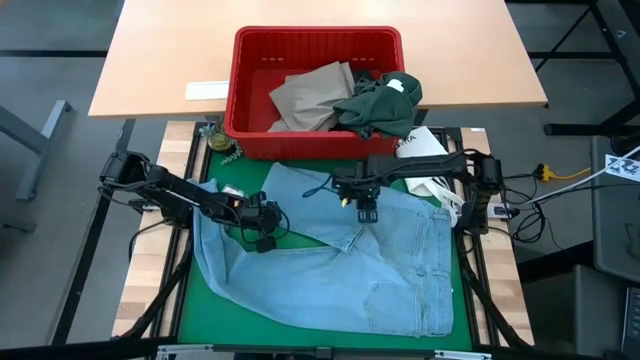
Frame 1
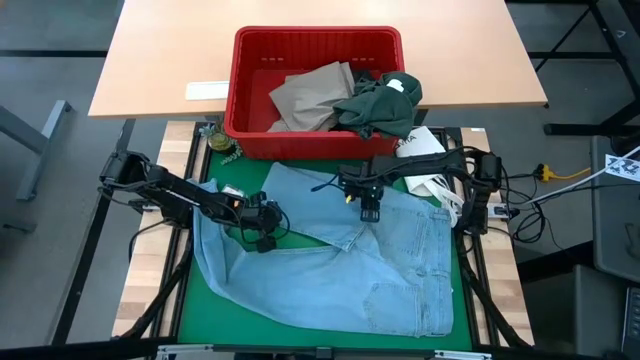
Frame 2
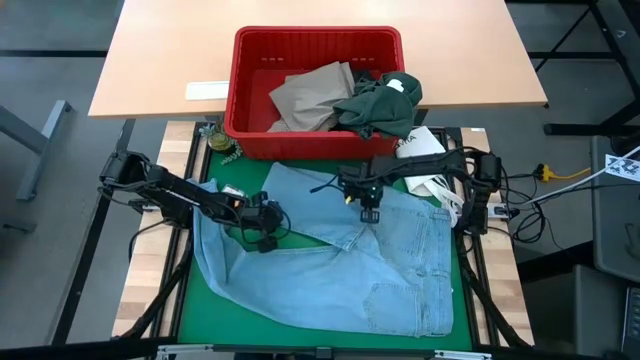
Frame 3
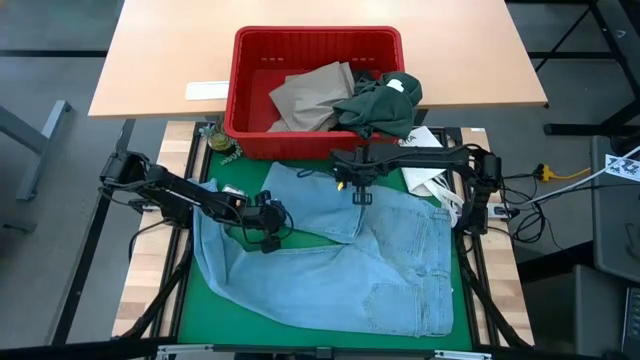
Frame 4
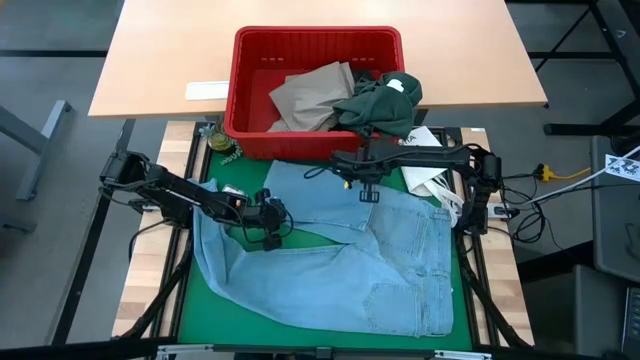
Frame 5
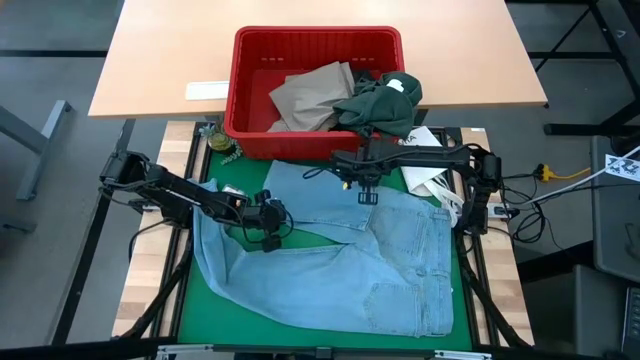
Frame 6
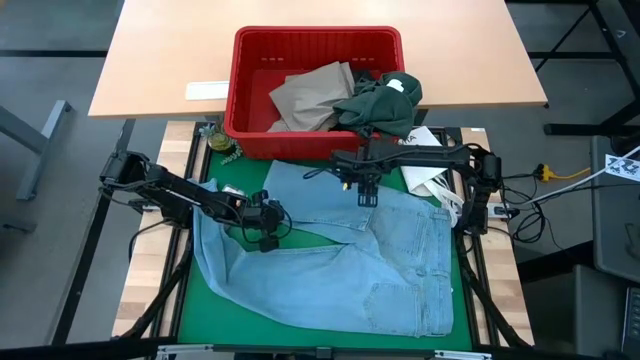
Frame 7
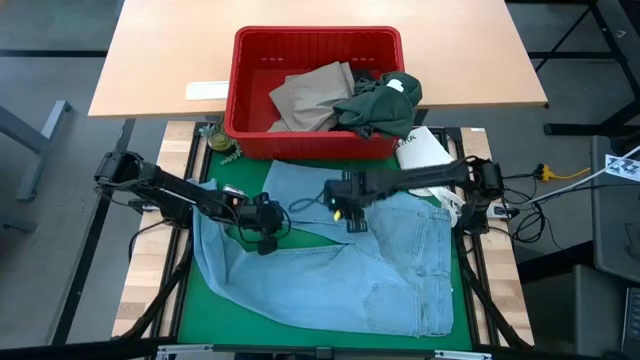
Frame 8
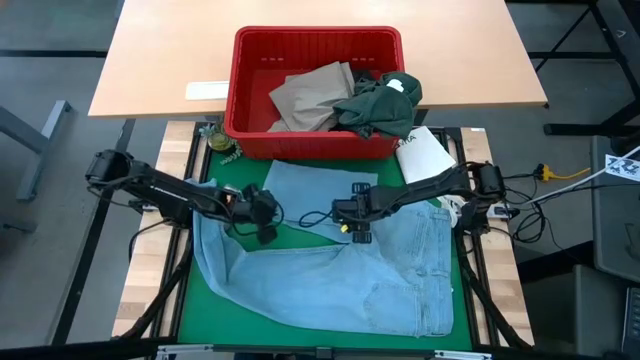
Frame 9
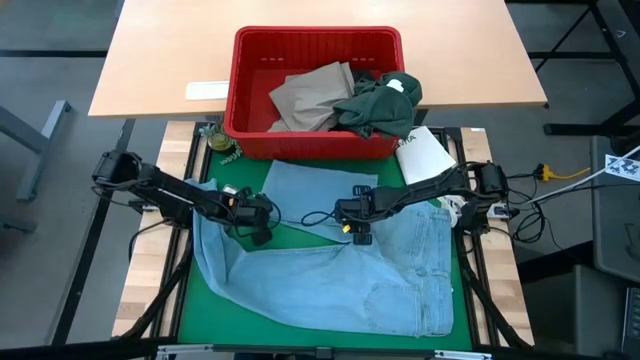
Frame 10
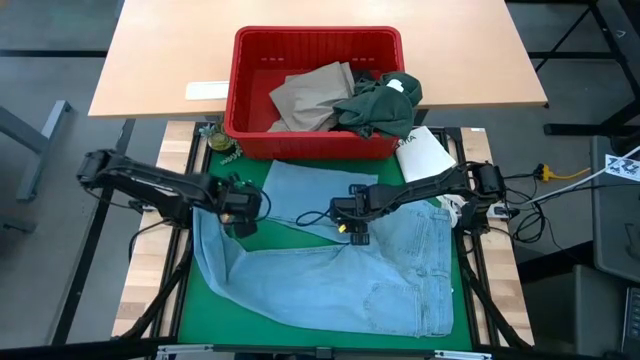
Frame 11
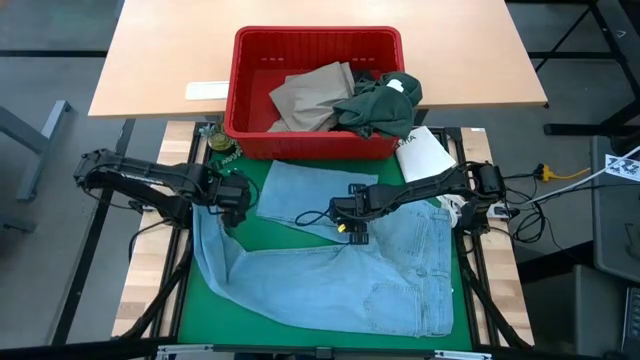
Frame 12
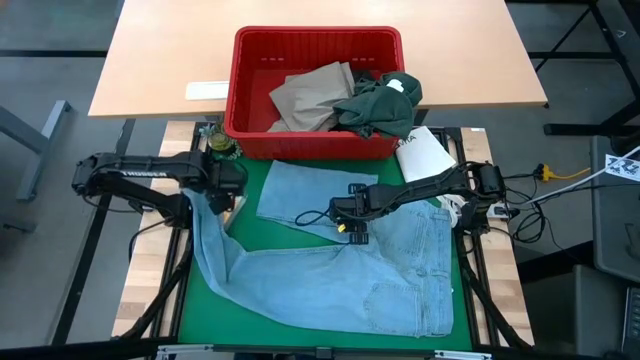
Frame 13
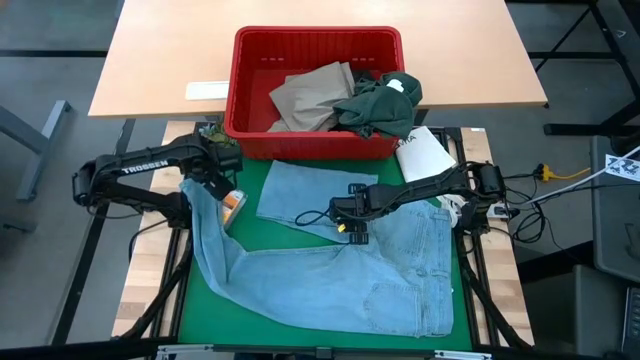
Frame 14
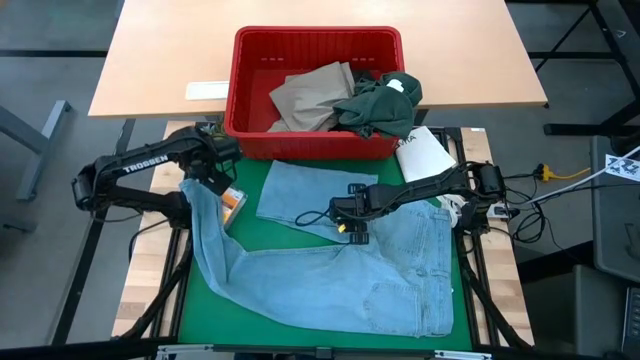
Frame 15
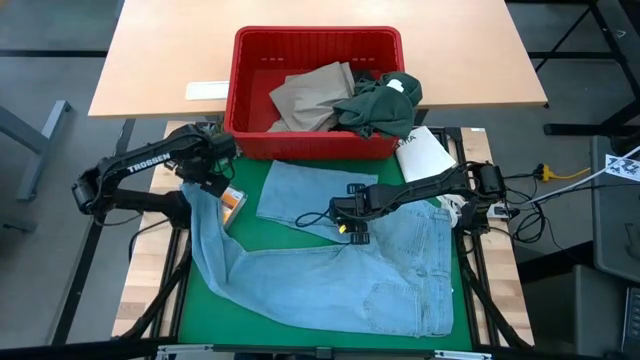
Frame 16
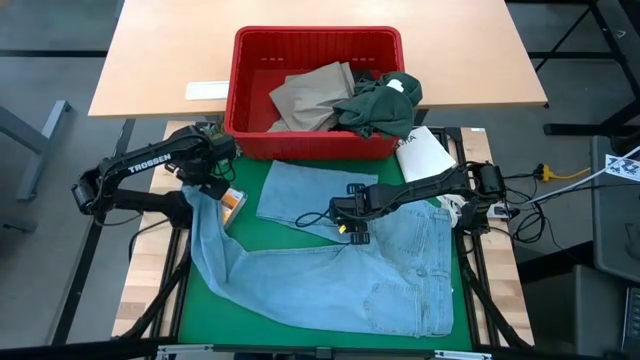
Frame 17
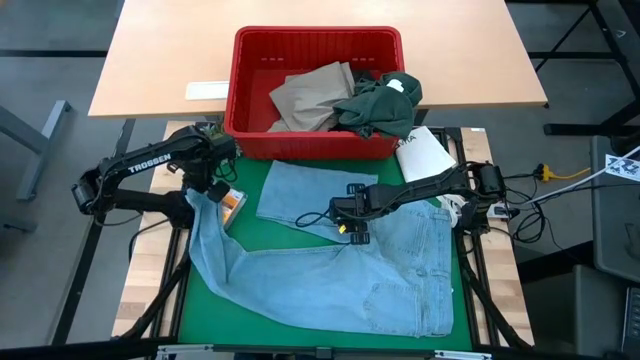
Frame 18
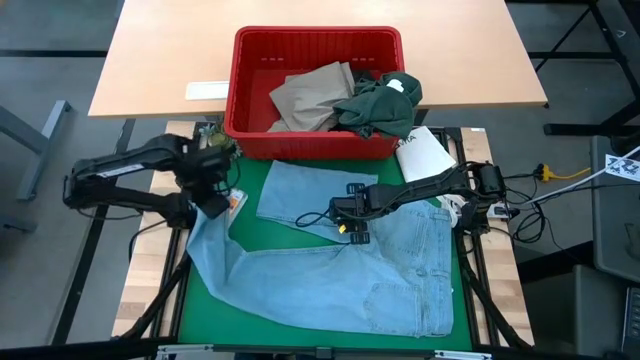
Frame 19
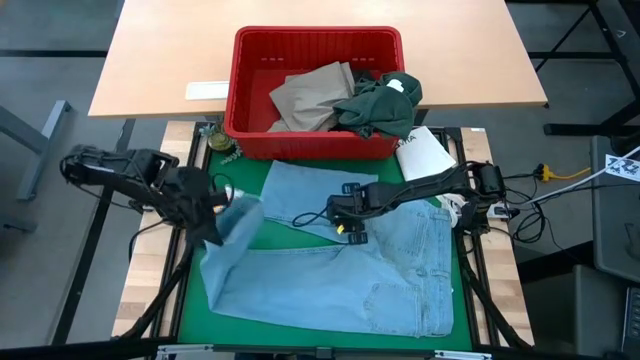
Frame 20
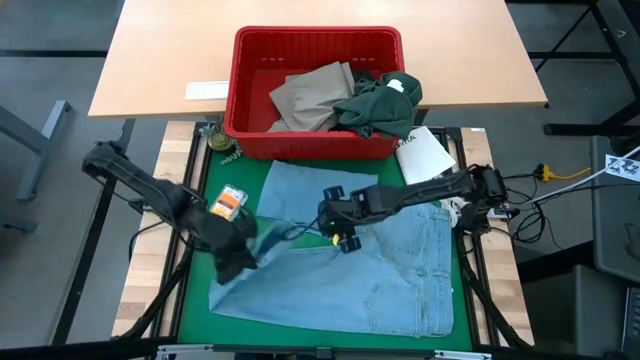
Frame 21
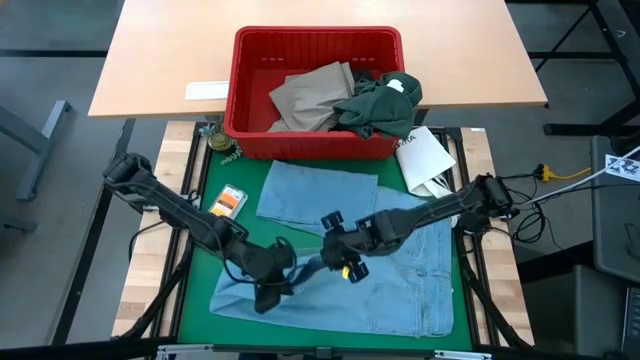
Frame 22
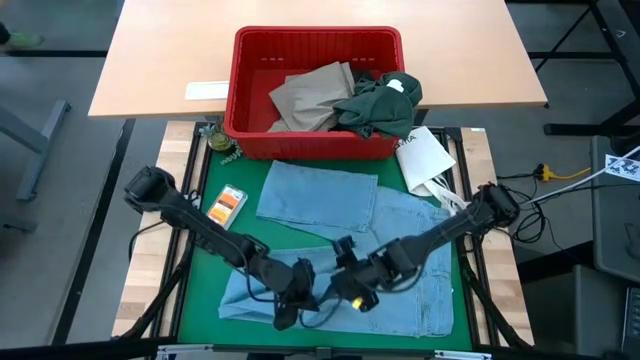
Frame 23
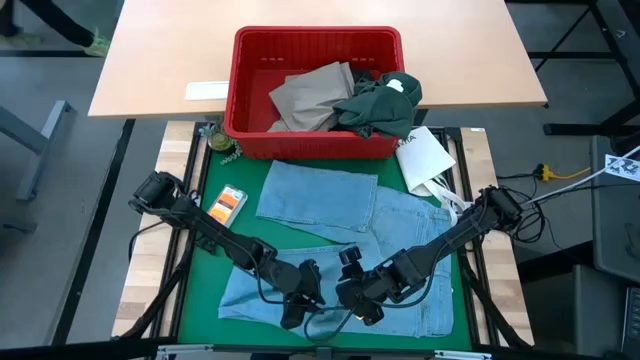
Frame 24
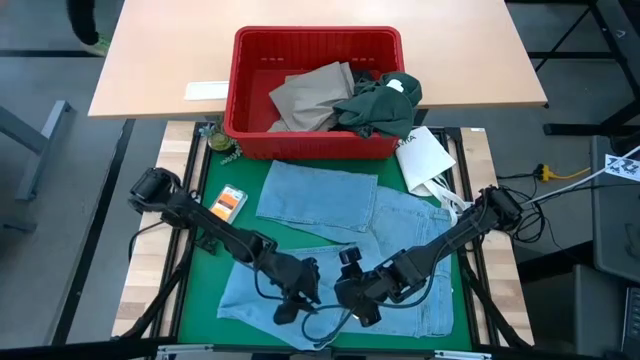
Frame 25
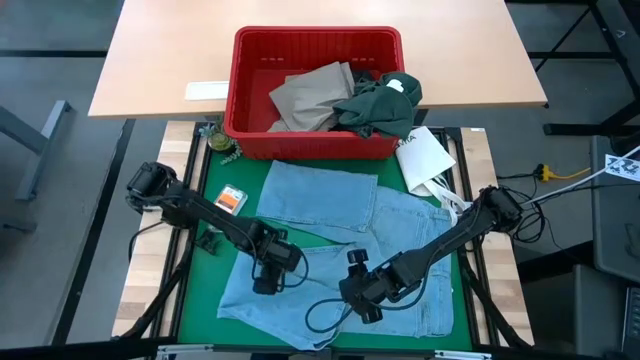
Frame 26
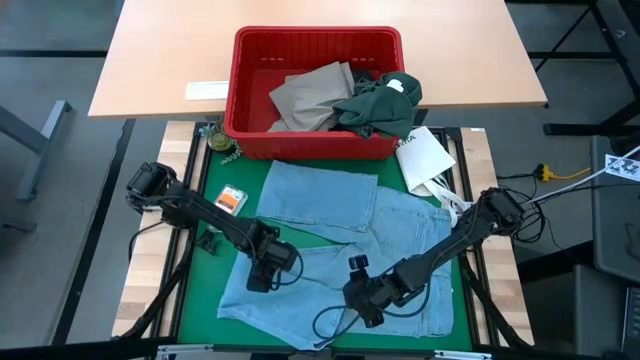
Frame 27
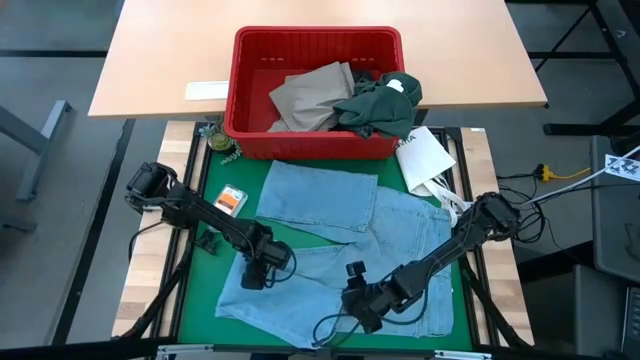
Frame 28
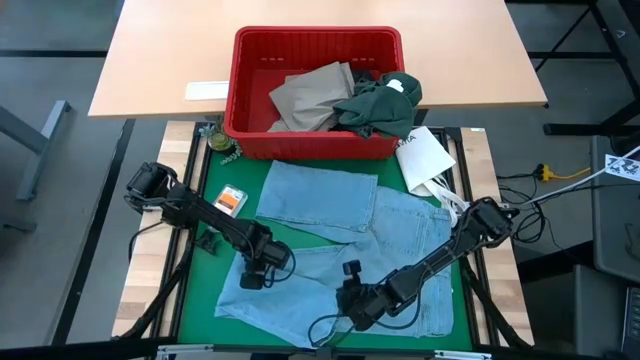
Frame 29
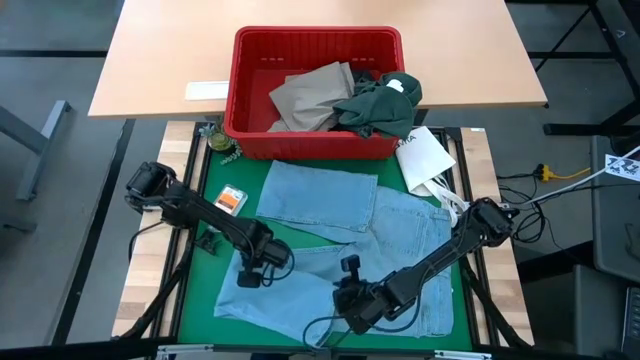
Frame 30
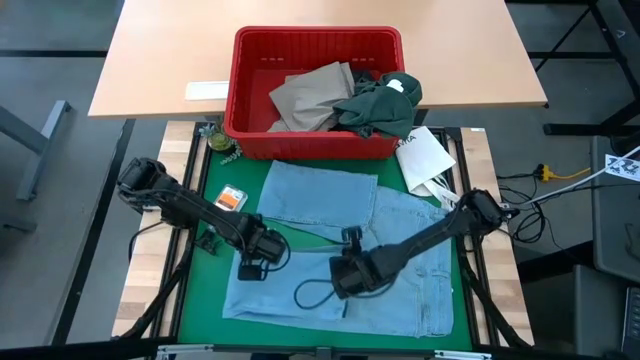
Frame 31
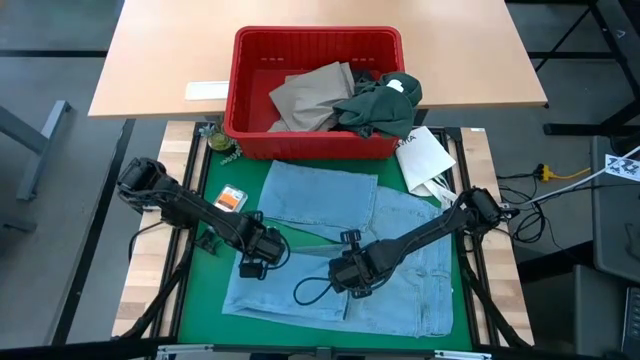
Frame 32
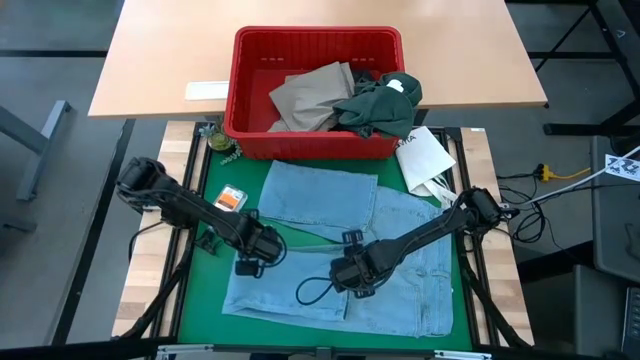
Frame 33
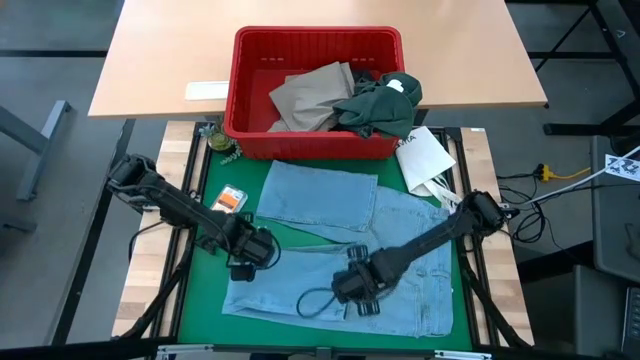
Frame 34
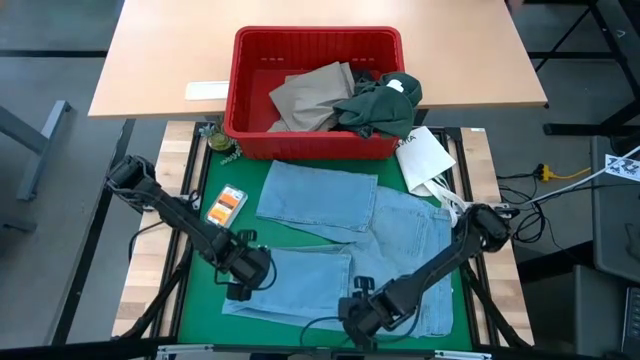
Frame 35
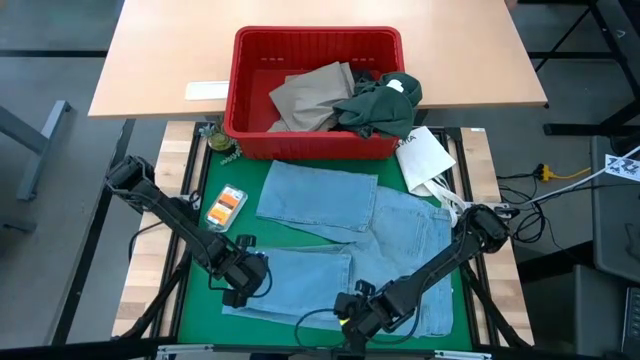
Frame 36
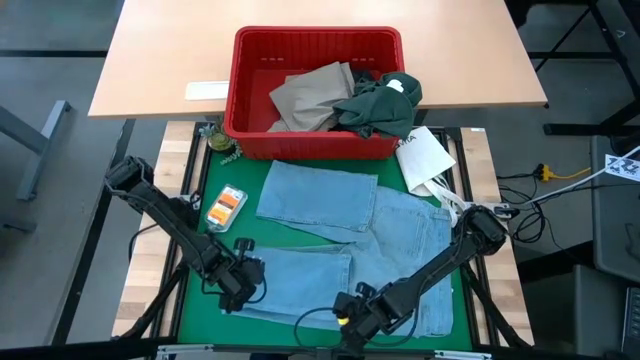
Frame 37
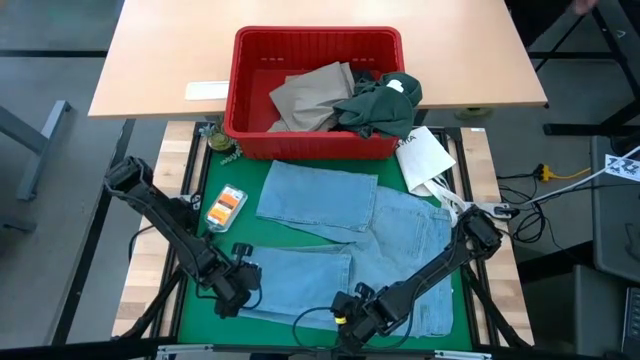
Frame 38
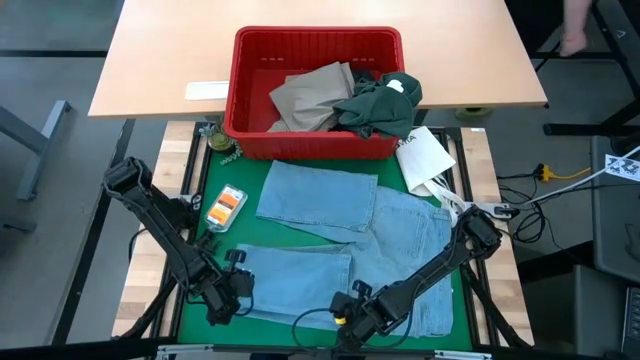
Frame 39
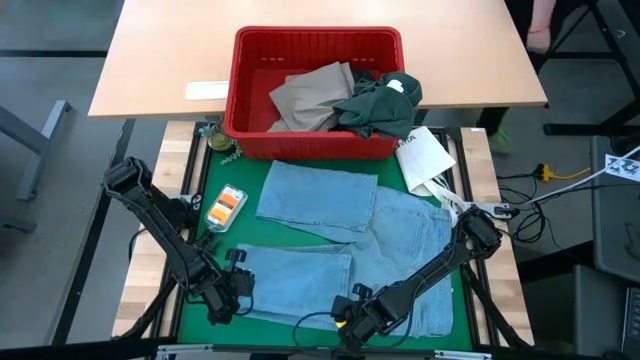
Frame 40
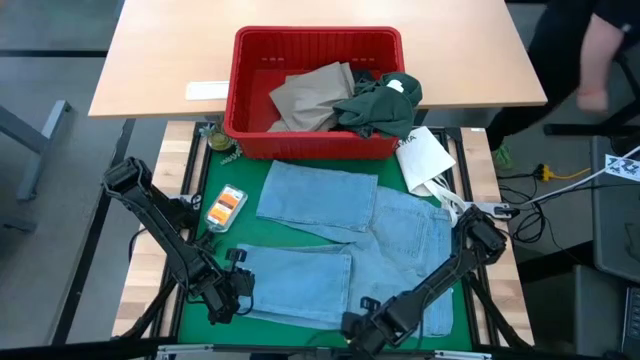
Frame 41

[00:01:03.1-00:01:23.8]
Task: Fold Laundry from Bin
Fold the blue pants
